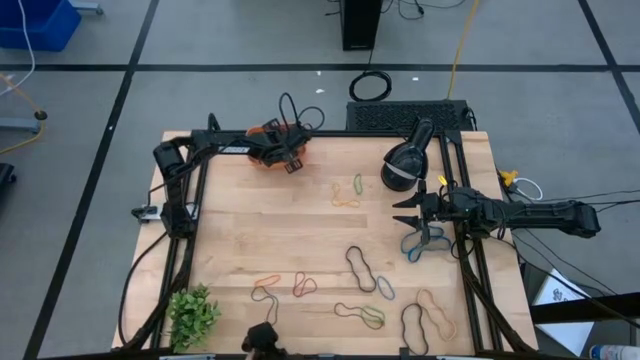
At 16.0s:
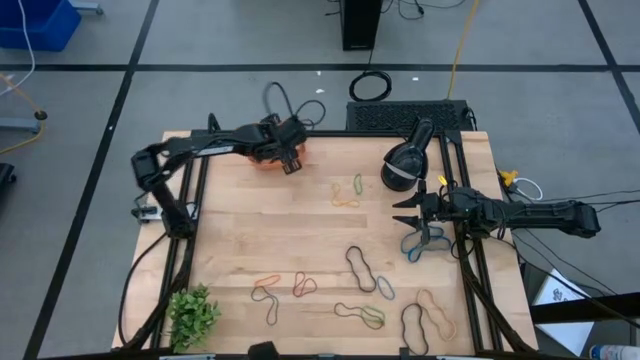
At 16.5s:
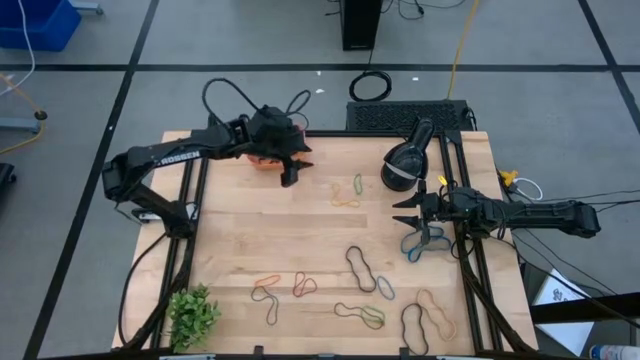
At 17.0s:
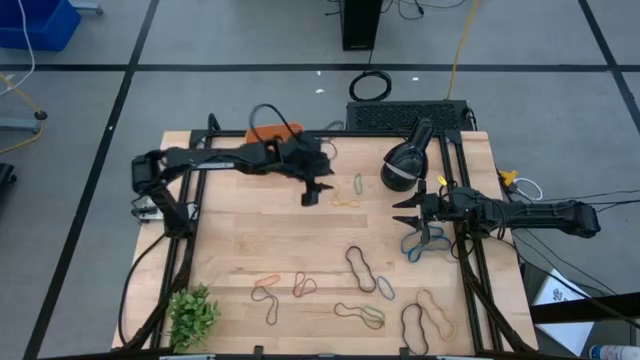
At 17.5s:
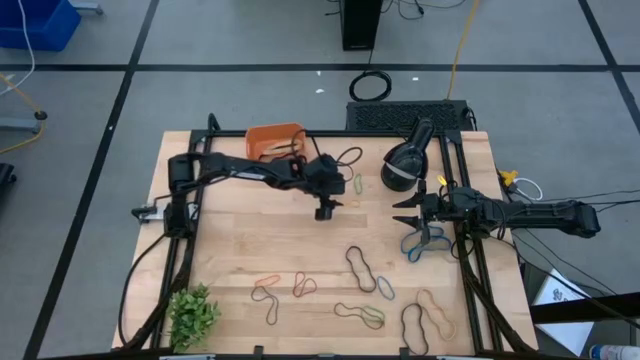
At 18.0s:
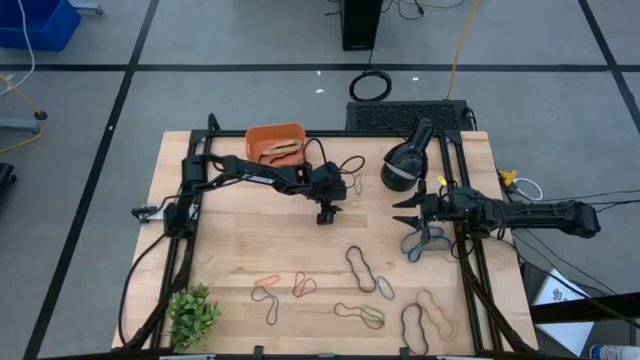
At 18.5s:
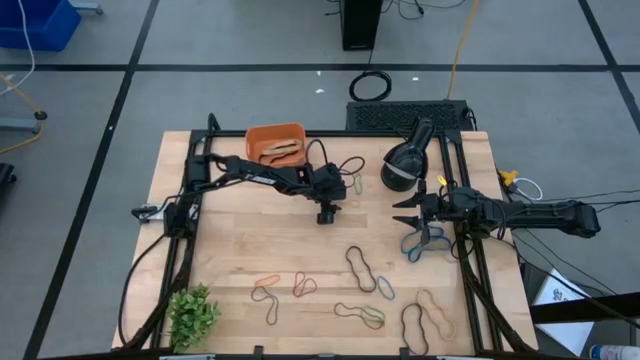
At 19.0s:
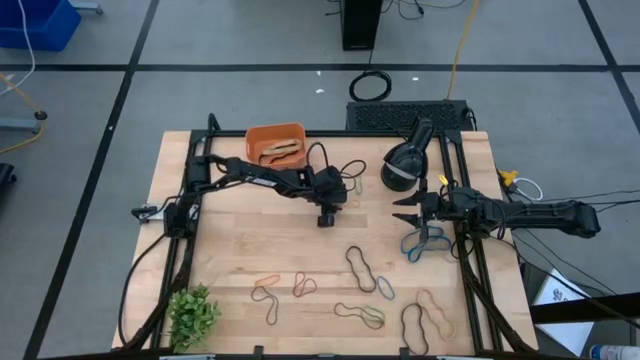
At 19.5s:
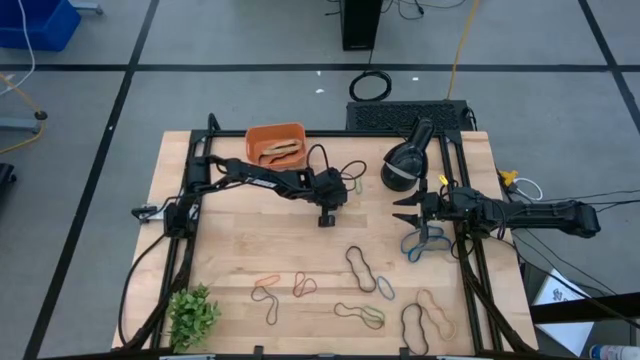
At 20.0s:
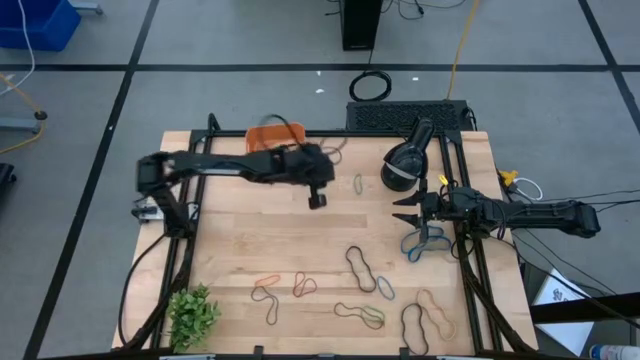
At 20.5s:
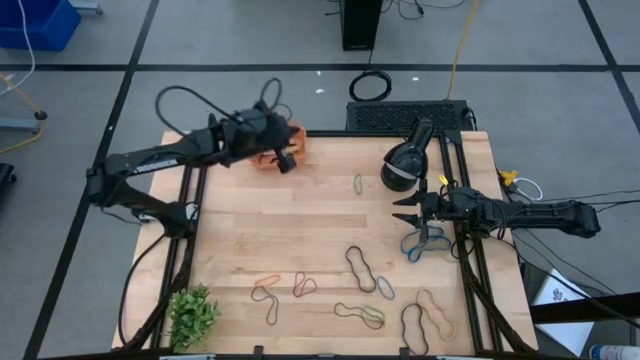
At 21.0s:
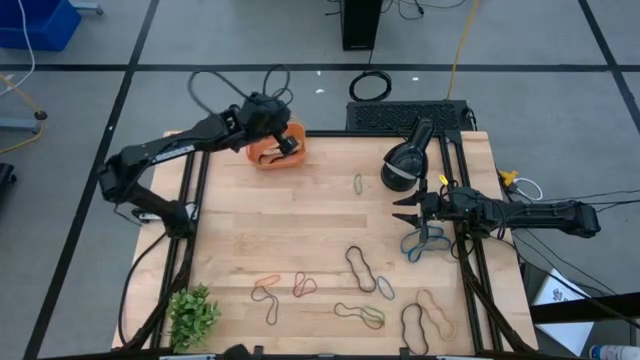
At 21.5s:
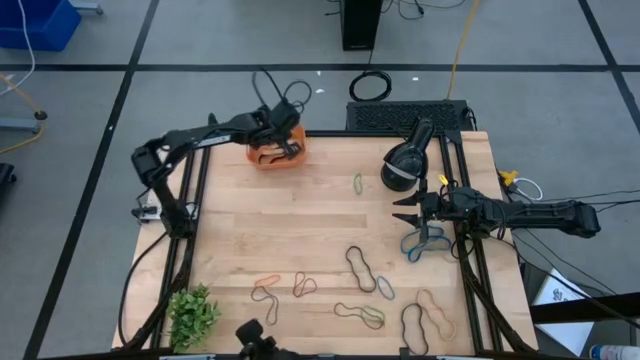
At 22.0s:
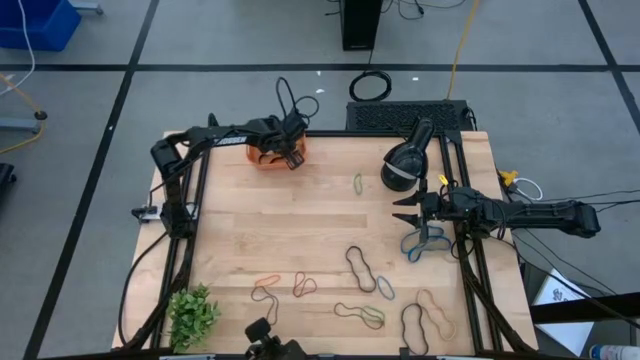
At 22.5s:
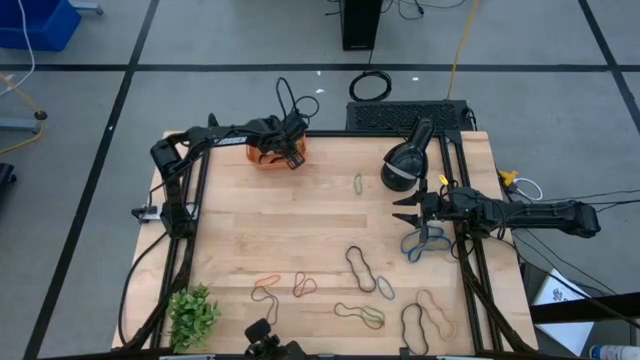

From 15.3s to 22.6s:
Task: Pick and place rubber bands into bin
Put the yellow rubber band into the orange container

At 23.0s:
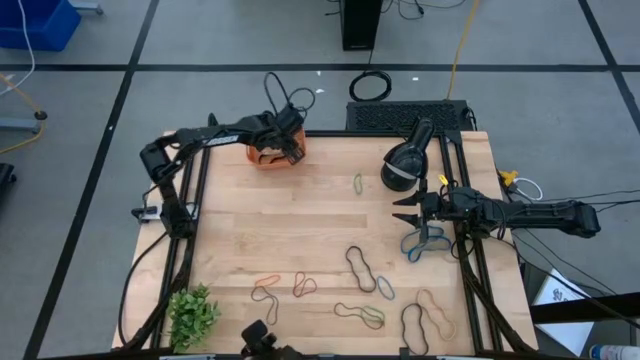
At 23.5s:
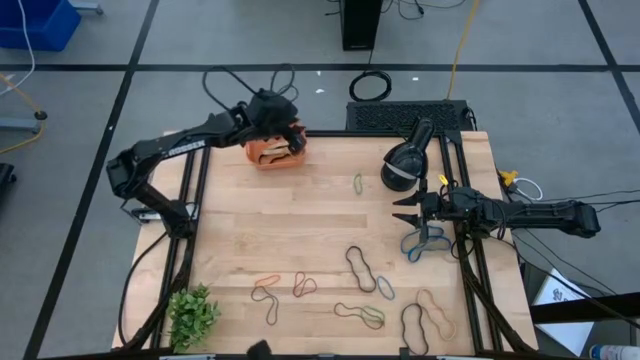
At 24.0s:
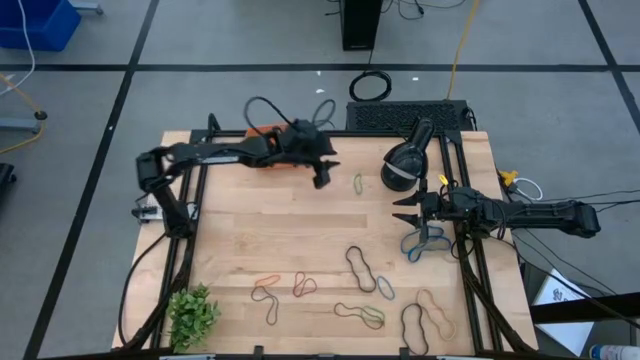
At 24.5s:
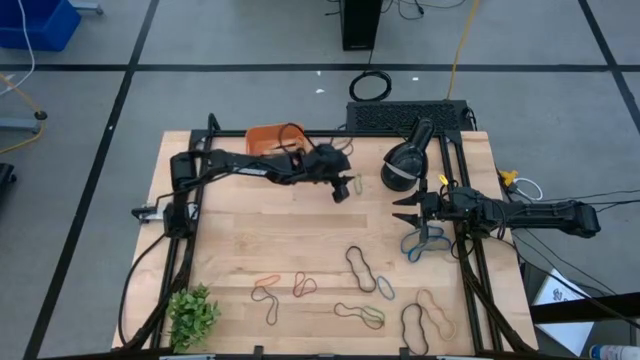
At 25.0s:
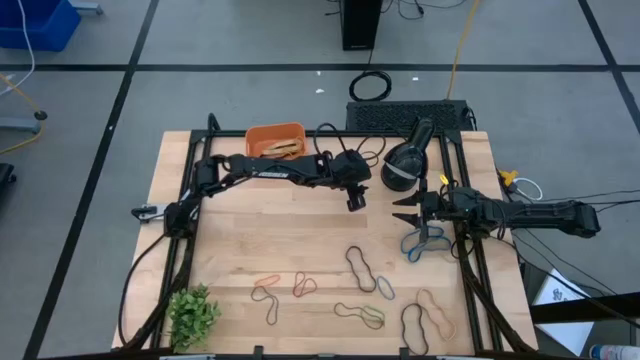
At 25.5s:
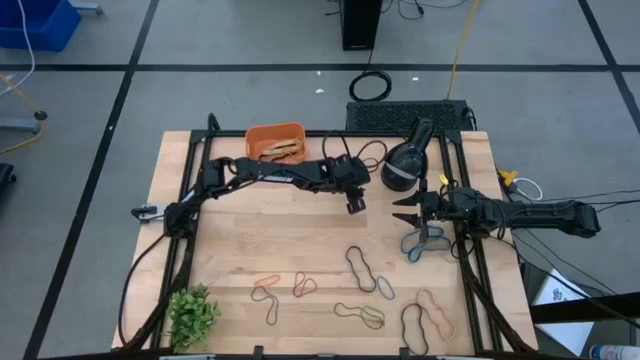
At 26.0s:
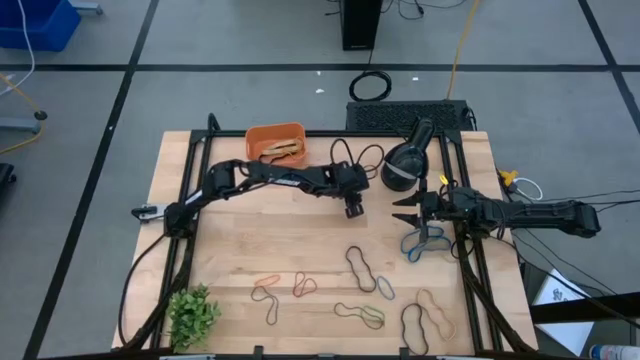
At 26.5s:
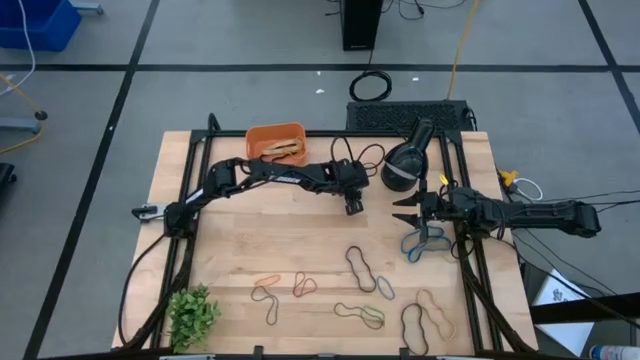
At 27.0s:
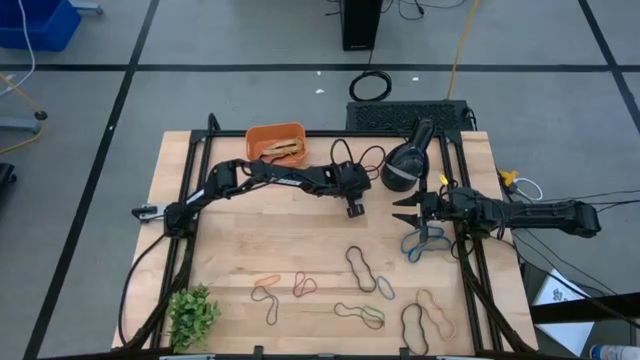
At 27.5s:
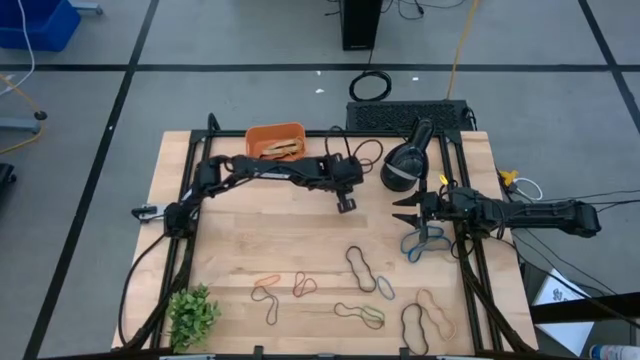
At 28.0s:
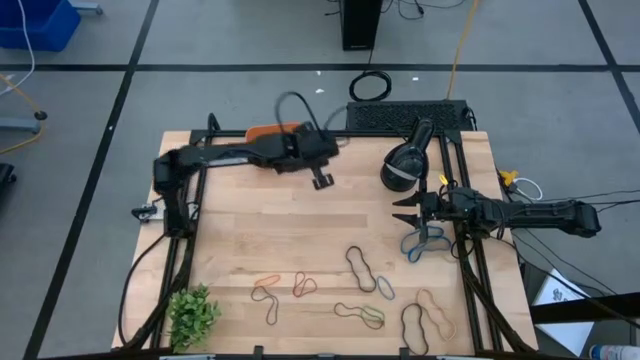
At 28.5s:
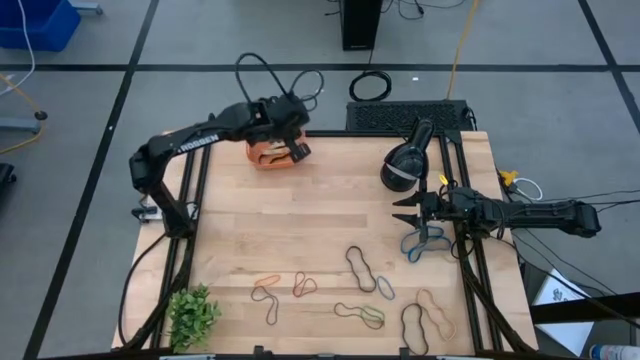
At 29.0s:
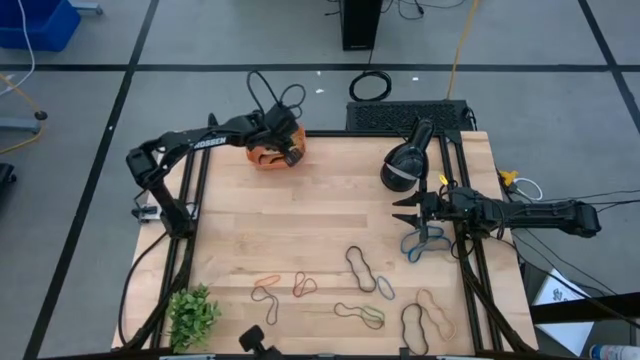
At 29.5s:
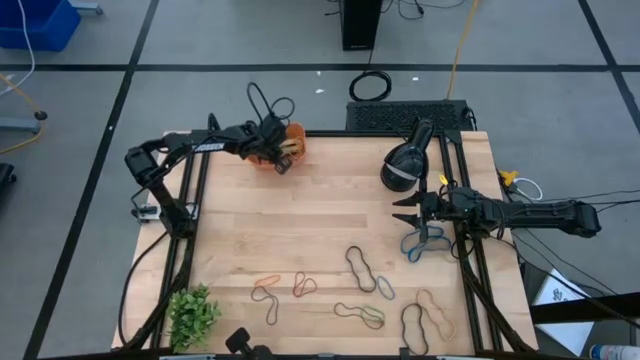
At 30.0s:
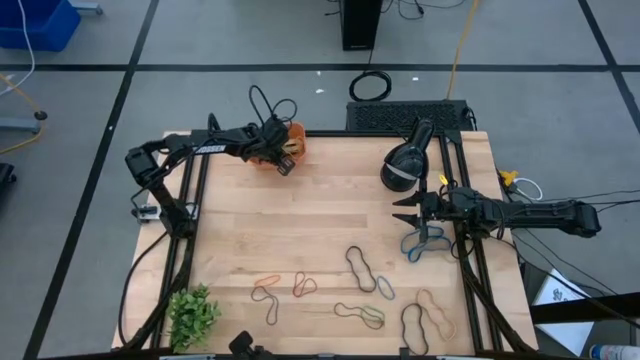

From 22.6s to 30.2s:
Put the top green rubber band into the orange container

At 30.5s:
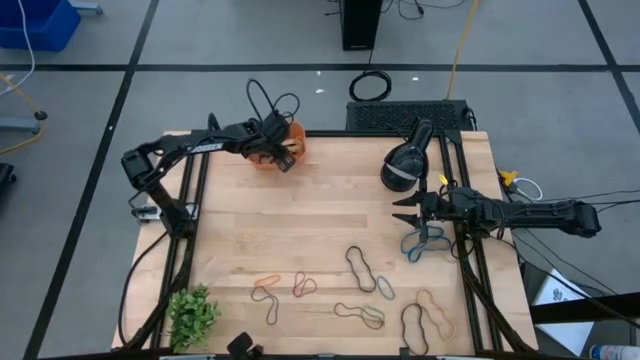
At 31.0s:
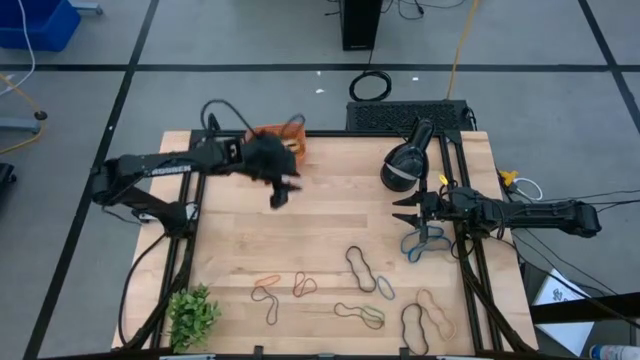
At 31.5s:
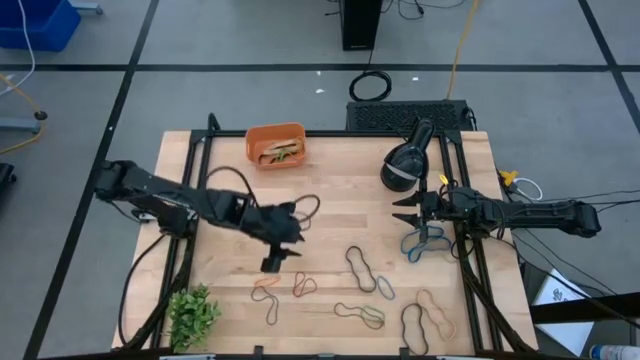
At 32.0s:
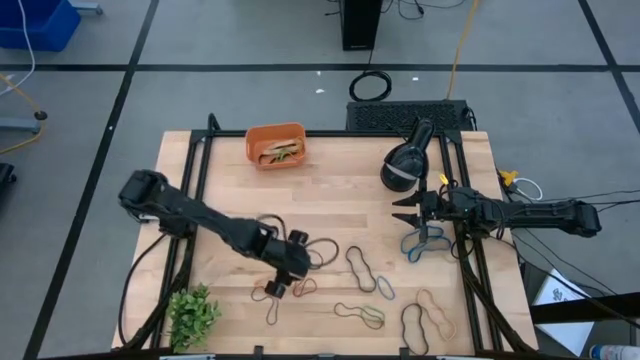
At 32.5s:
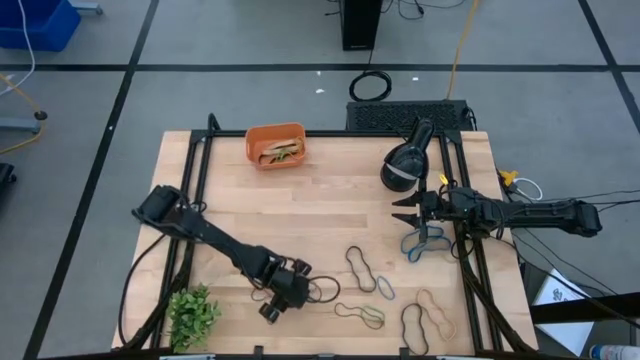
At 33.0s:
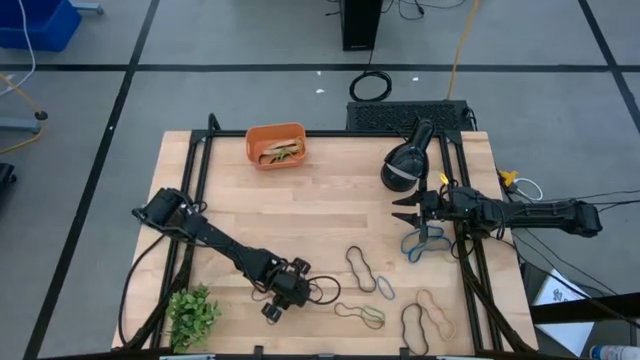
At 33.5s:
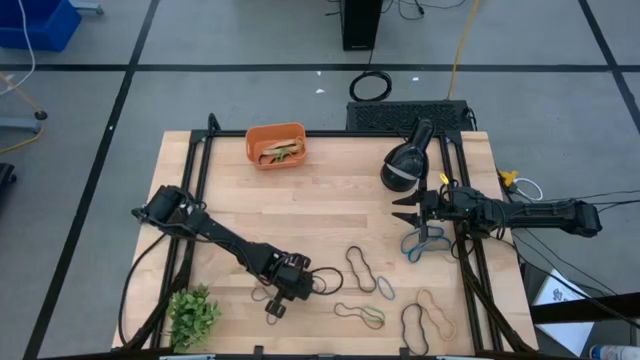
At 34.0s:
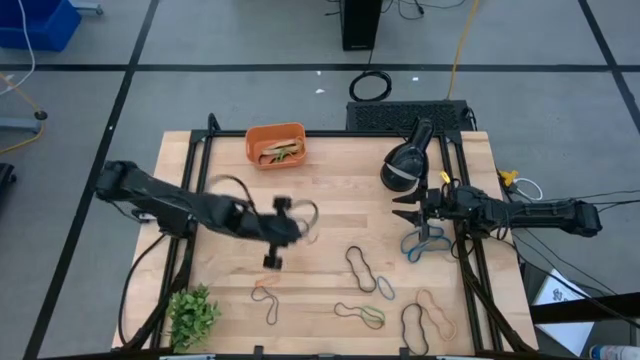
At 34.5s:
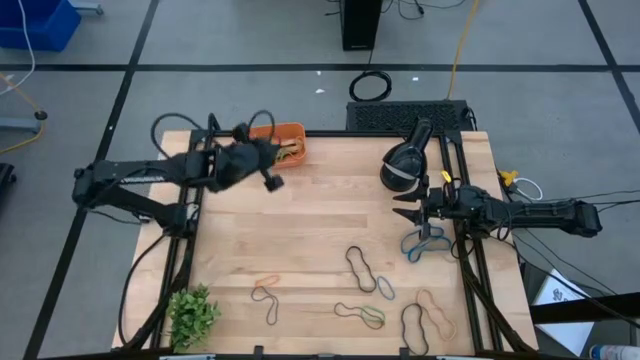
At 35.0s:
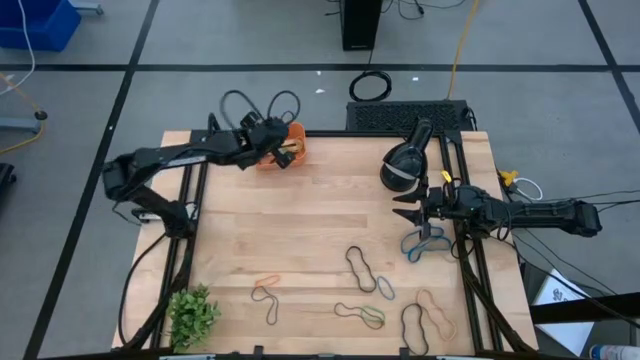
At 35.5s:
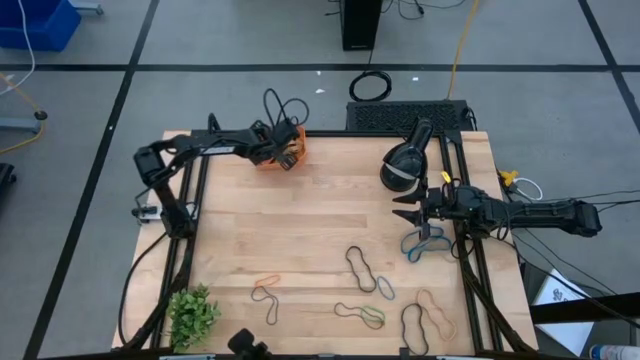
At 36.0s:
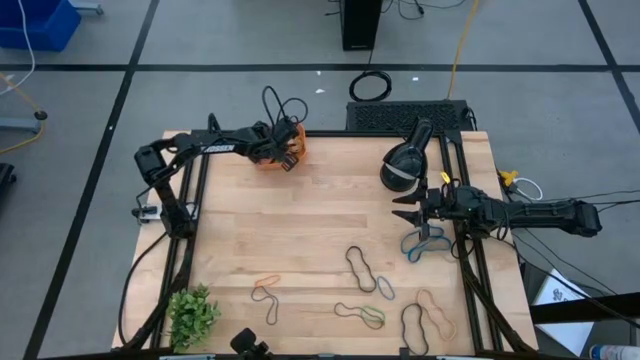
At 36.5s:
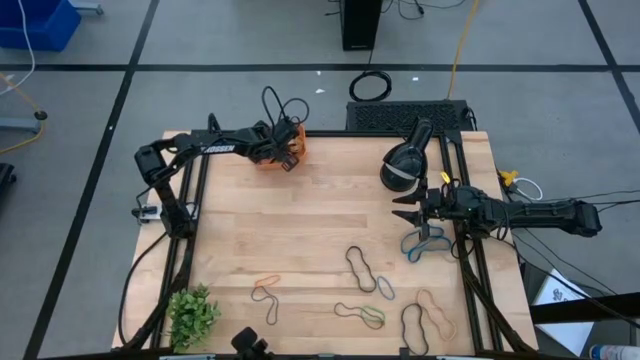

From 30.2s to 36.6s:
Put the red rubber band into the orange container

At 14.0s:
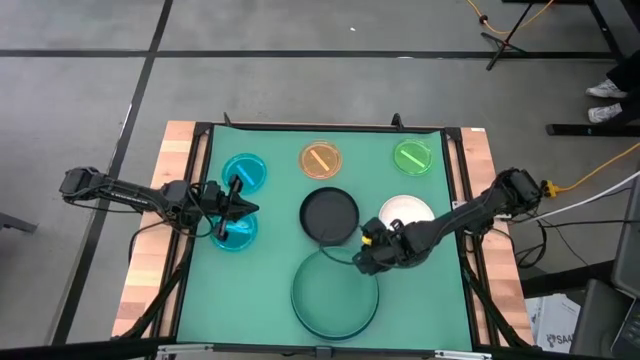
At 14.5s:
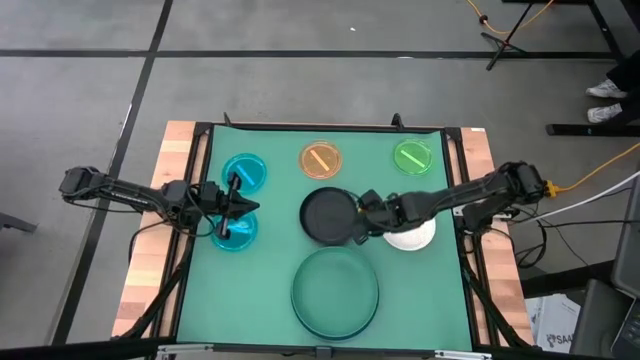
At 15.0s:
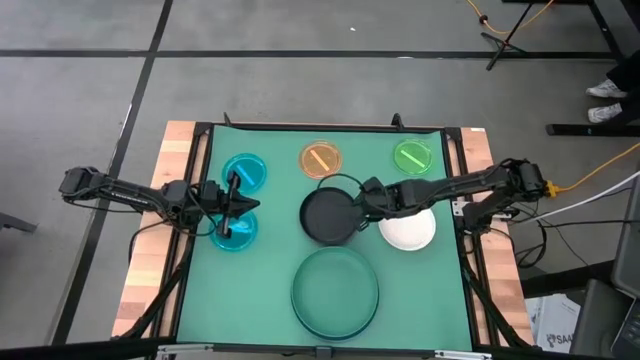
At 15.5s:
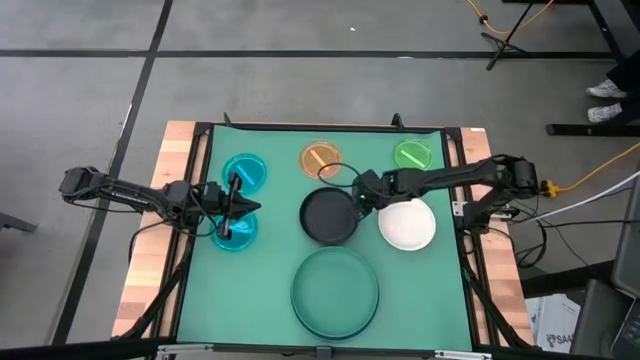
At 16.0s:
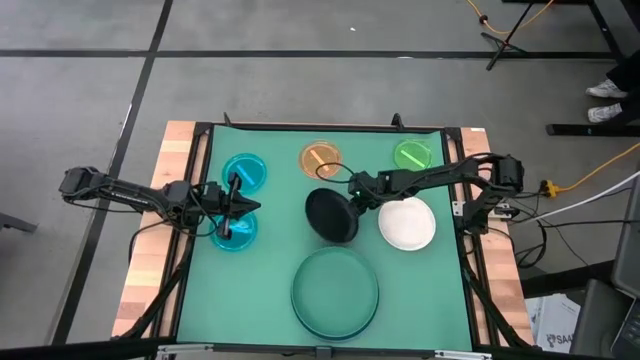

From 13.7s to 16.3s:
Task: Stack plastic plates
Stack the black plate on top of the green plate
